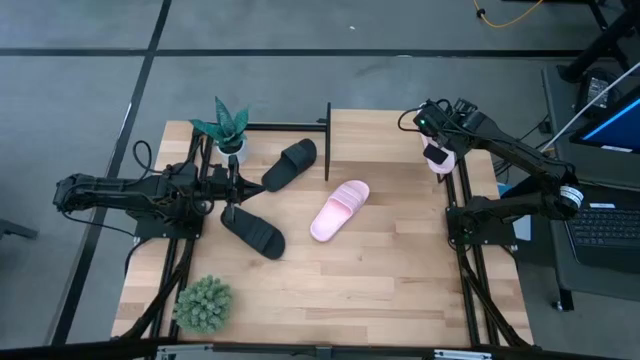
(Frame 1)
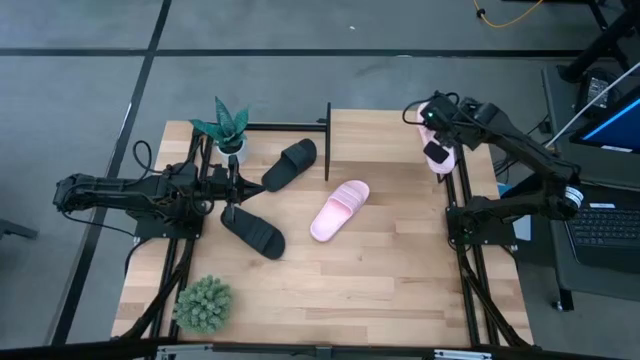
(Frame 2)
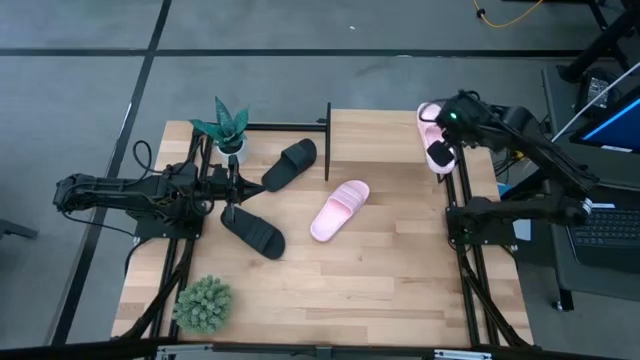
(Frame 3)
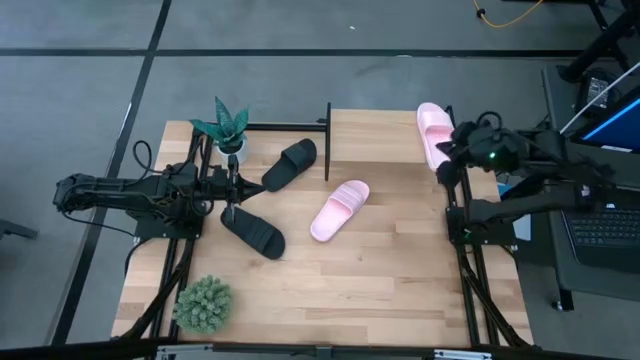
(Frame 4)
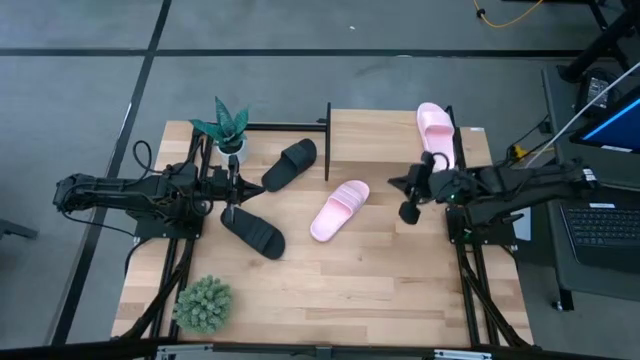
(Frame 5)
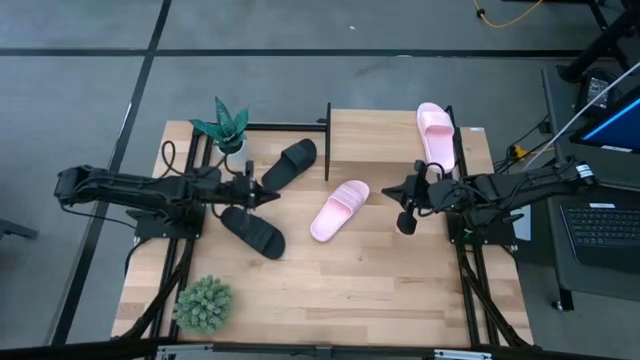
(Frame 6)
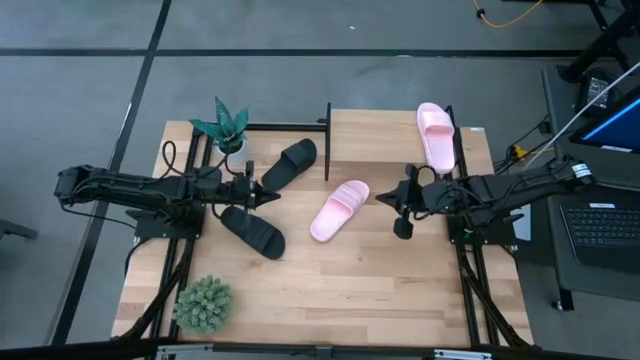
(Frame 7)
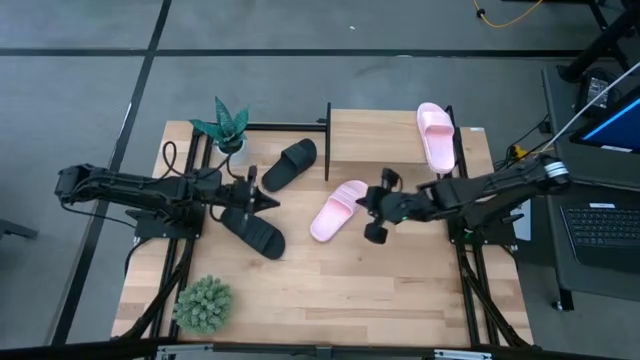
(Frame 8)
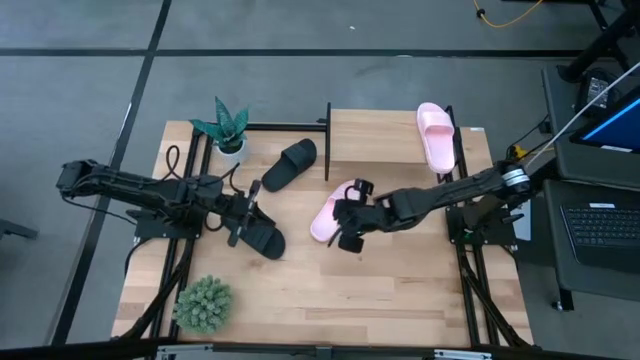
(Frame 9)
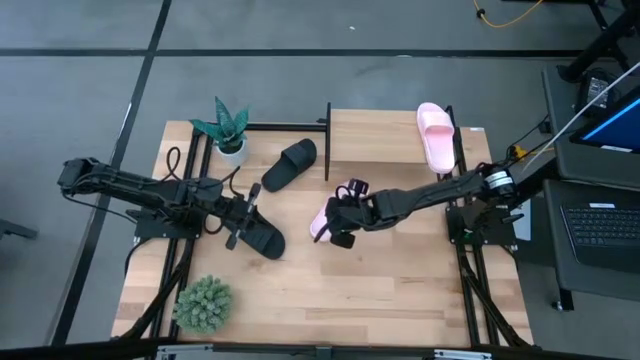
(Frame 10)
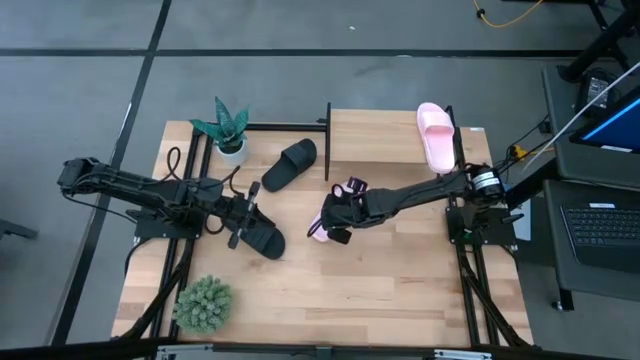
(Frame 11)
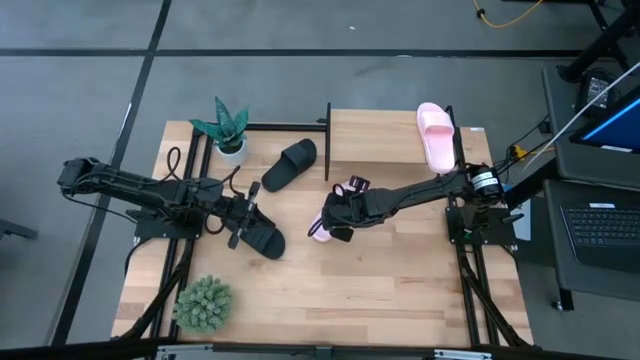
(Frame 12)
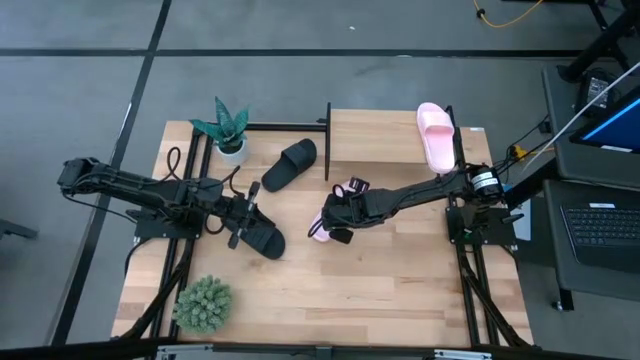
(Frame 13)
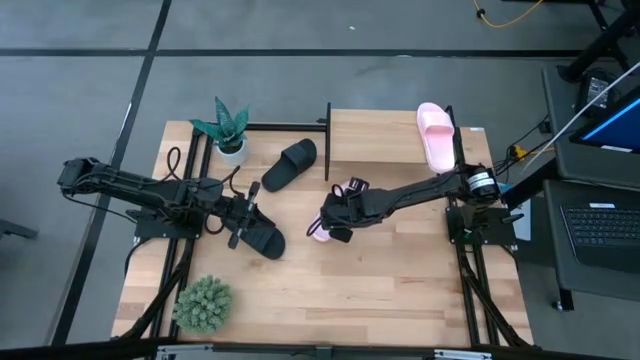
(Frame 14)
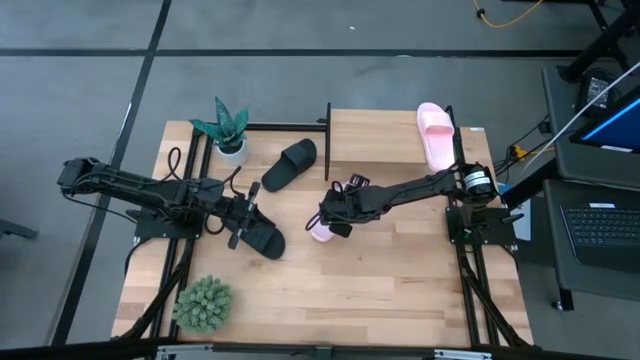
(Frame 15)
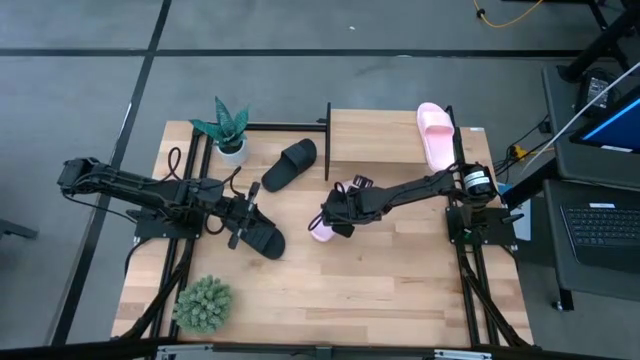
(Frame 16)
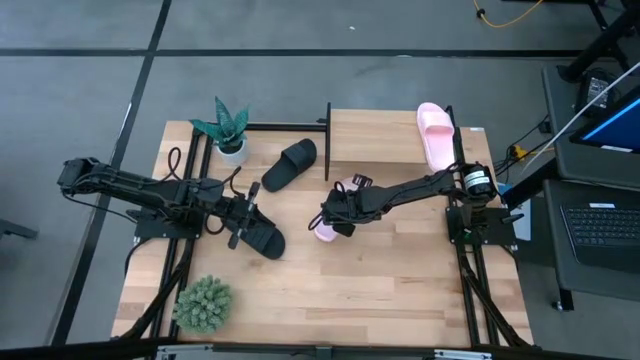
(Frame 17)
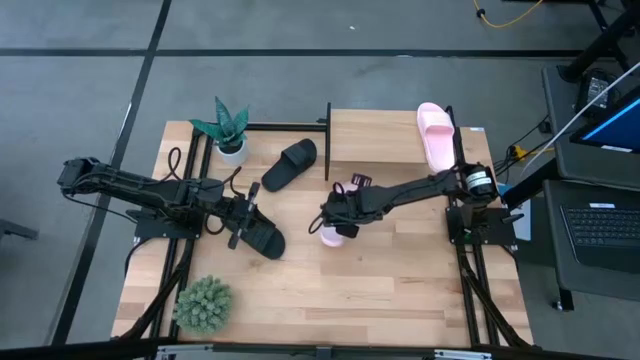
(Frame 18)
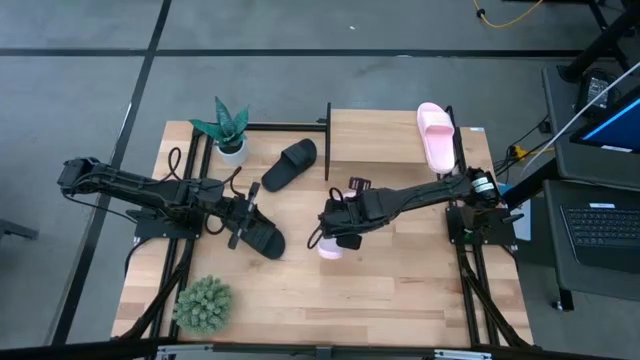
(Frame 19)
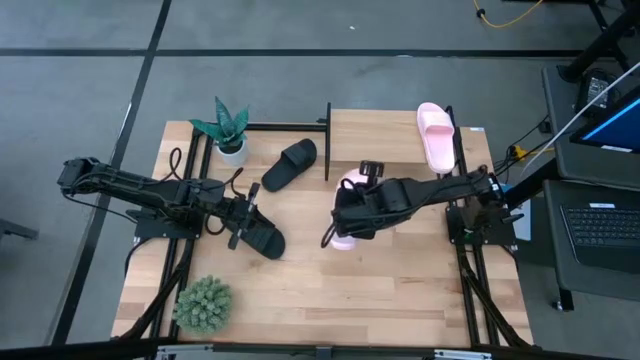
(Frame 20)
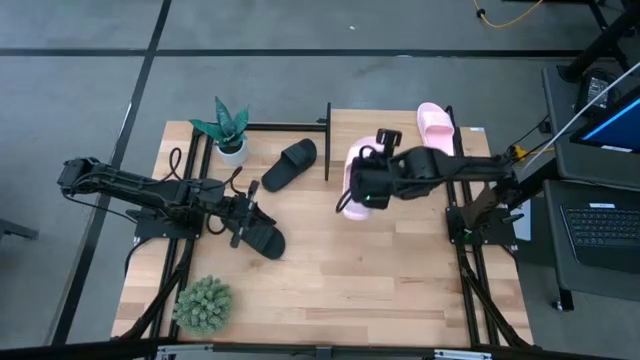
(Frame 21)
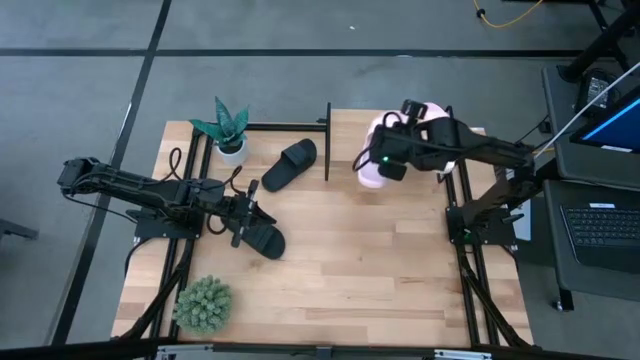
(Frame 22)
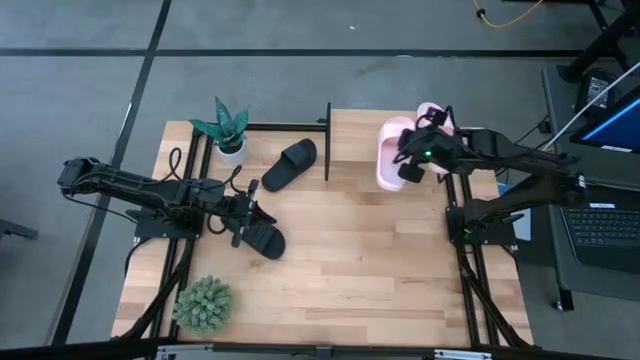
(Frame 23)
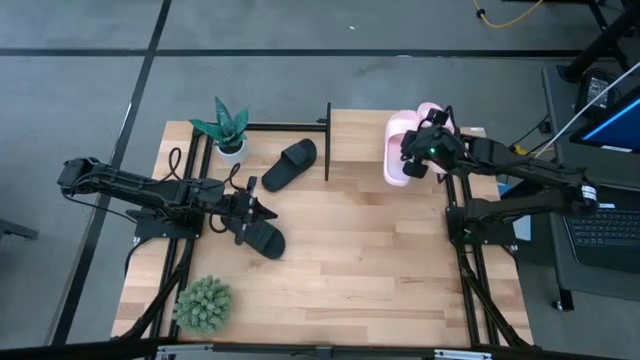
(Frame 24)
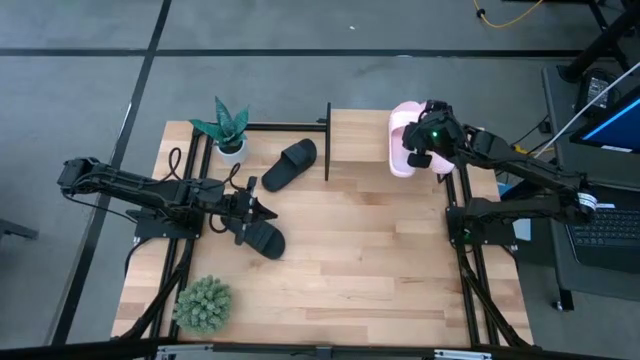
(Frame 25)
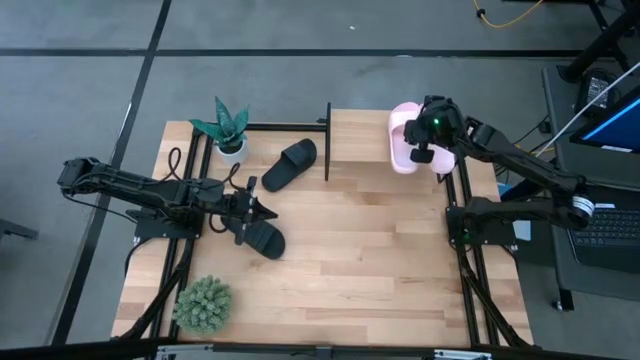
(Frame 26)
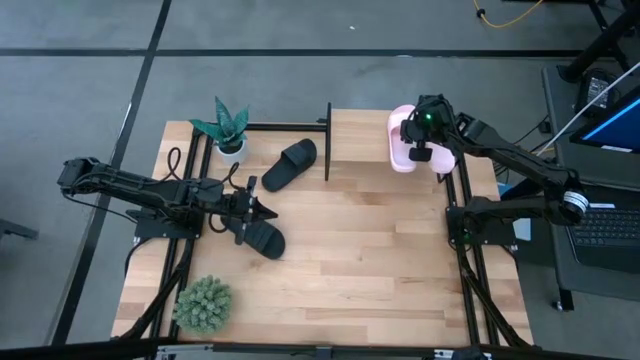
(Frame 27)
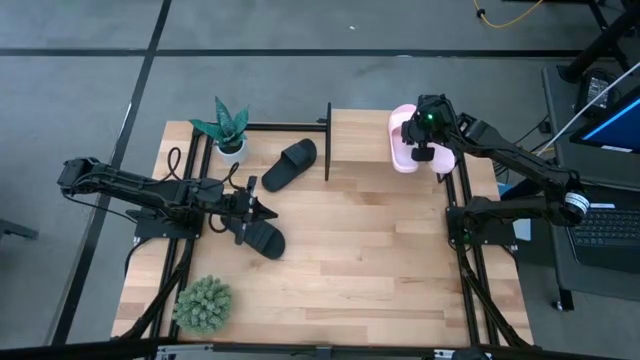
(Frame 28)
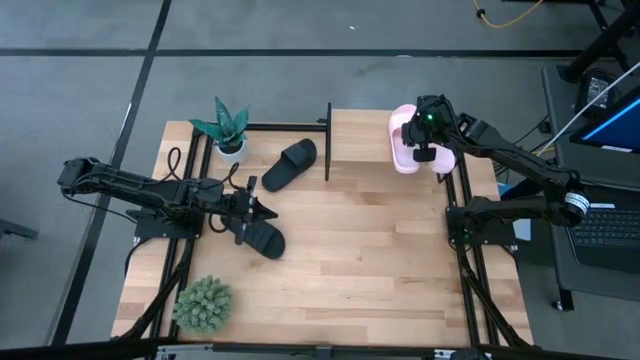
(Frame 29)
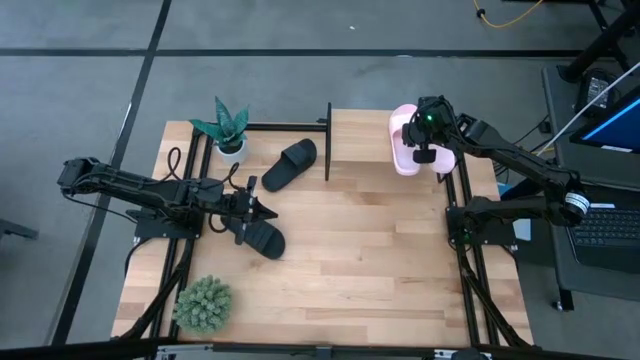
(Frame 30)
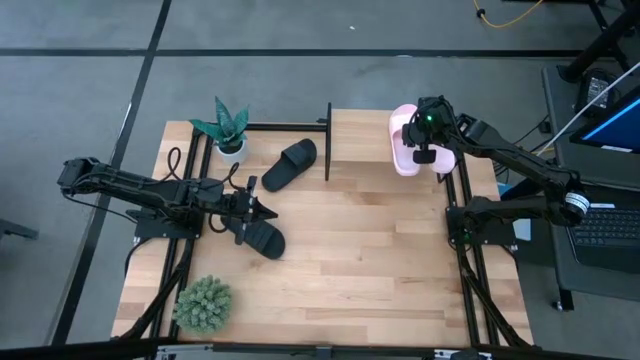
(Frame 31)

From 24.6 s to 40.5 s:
Task: Pick and place slides into the shelf
Put the pink slide on the shelf

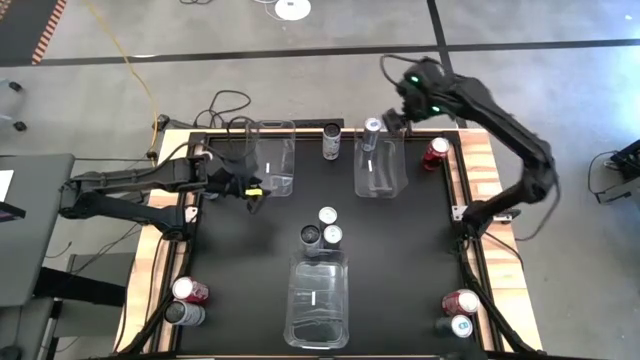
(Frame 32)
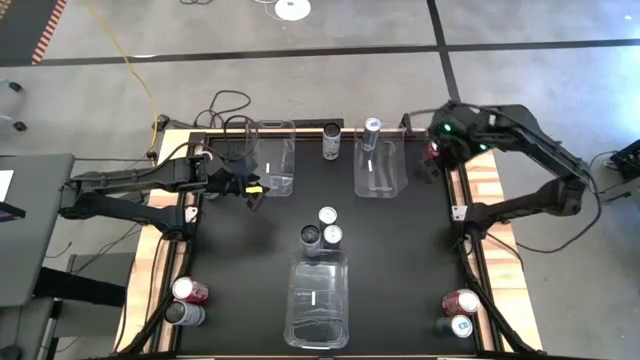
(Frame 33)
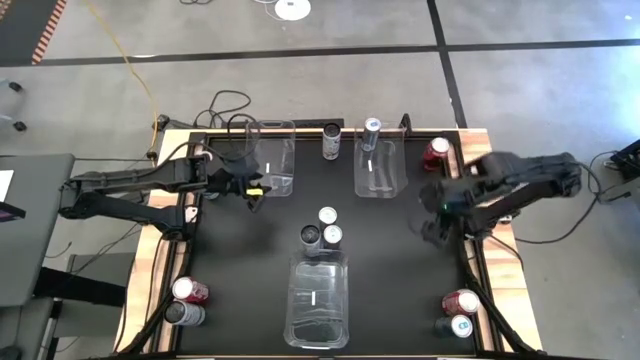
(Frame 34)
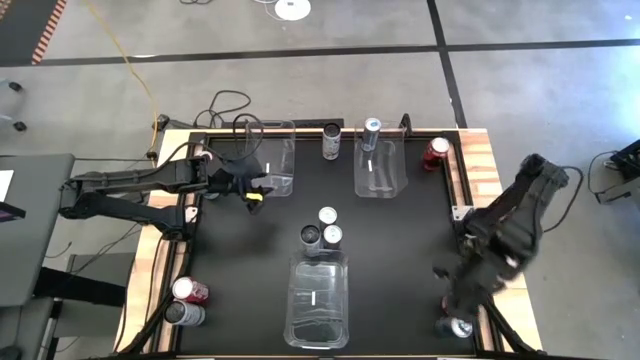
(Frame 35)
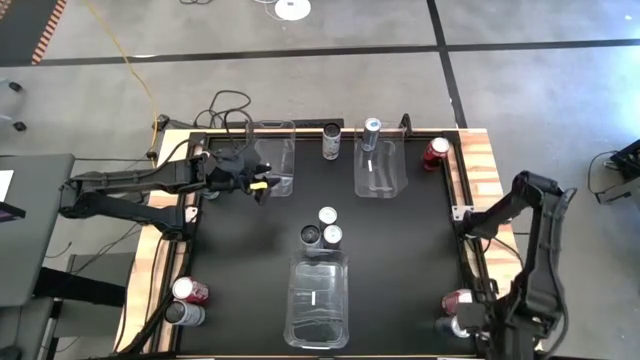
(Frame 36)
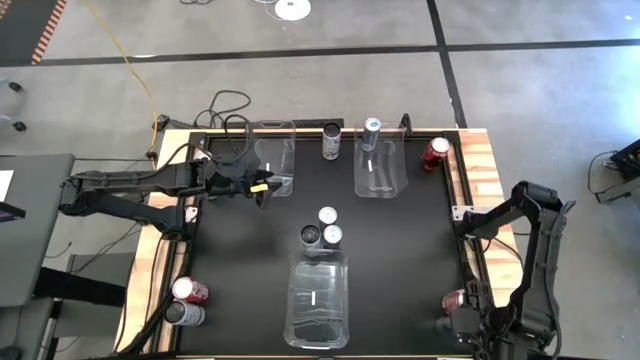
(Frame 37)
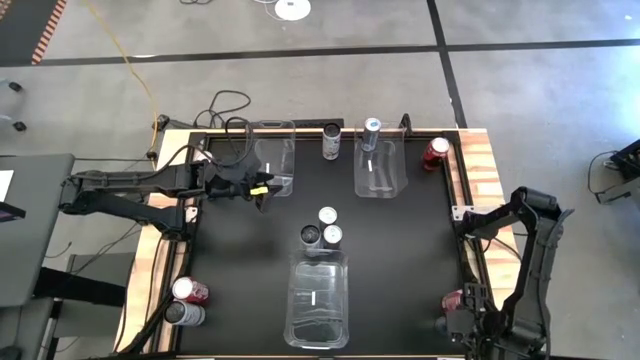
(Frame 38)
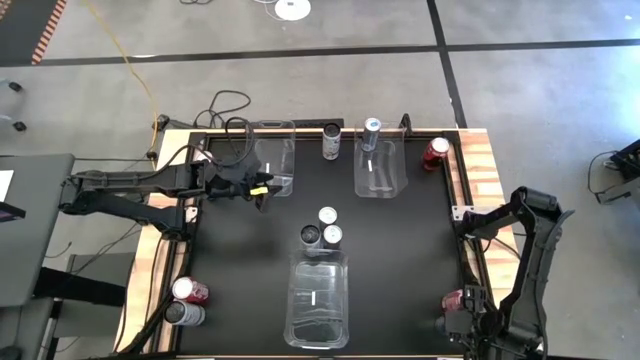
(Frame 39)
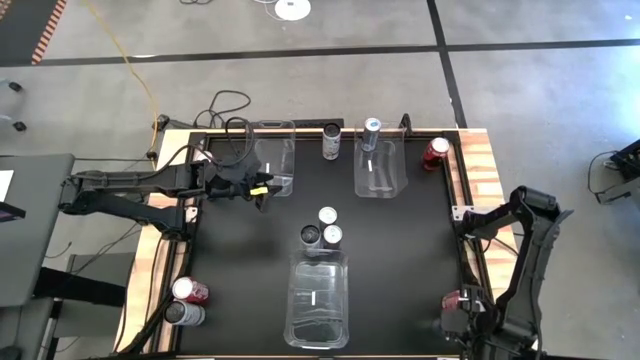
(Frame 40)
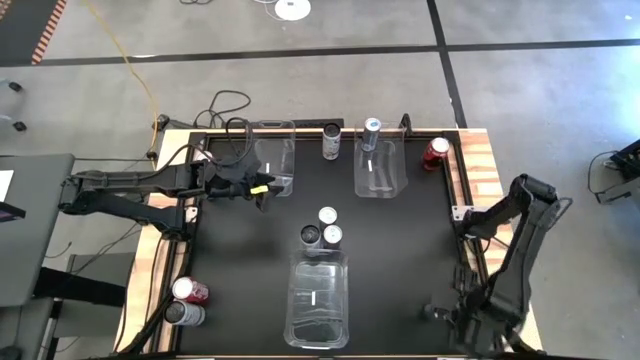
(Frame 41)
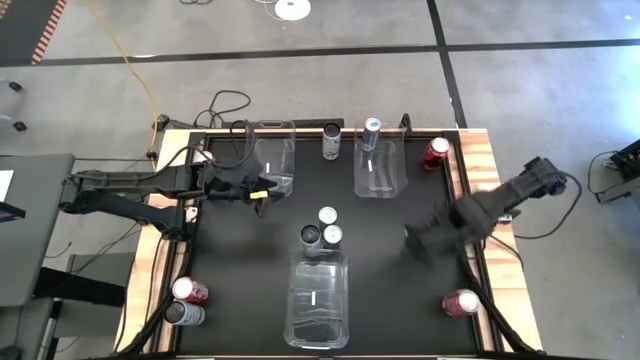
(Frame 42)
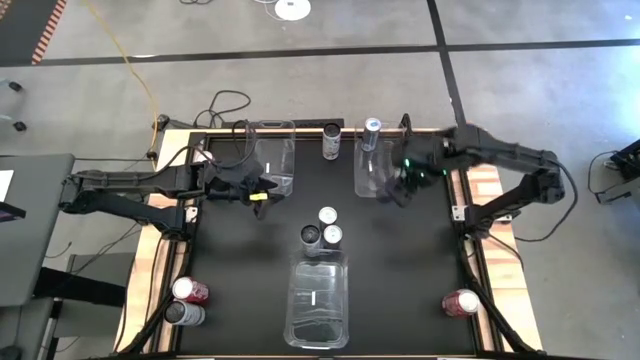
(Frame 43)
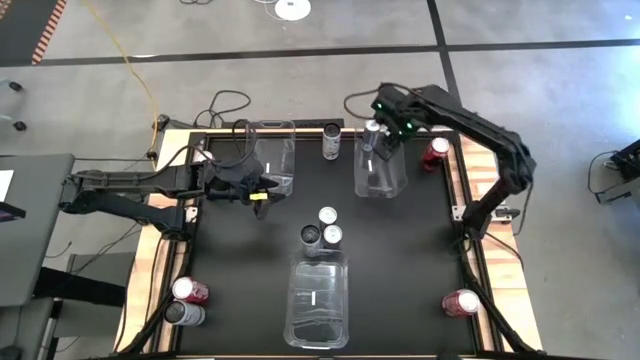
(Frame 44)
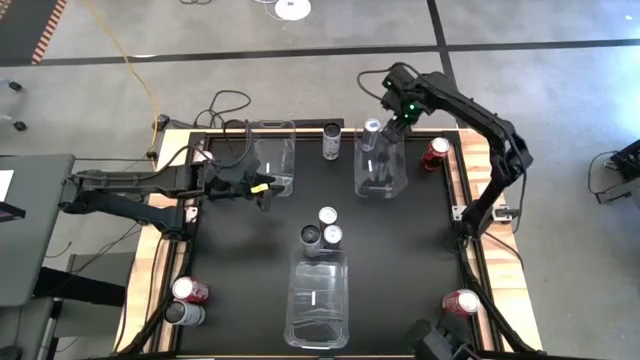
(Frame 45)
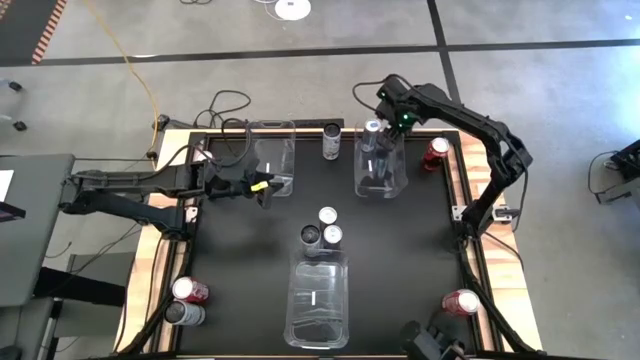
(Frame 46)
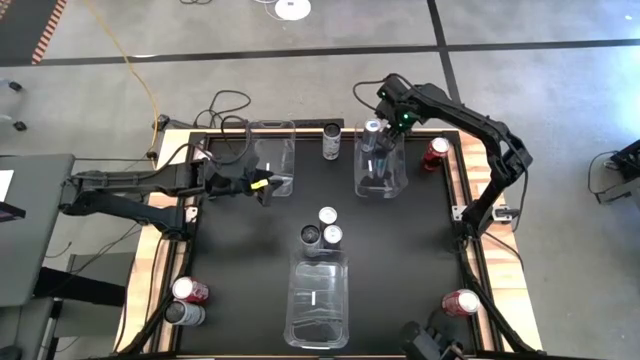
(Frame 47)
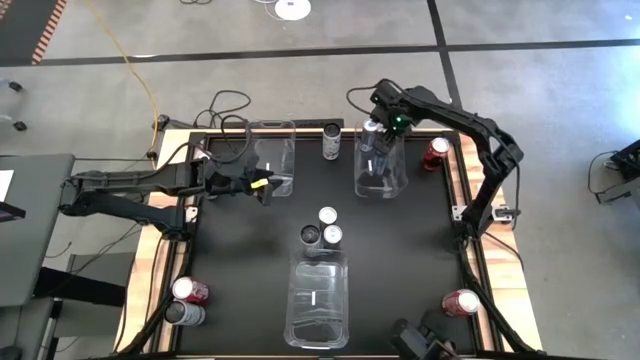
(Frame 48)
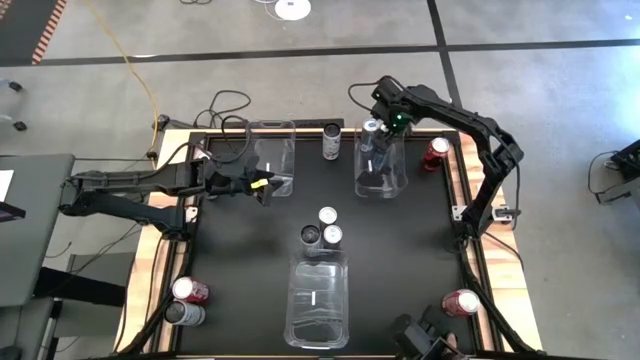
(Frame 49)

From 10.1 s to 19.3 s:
Task: Sort soda cans
Put the bottom right blue soda can into the top right transparent bin
